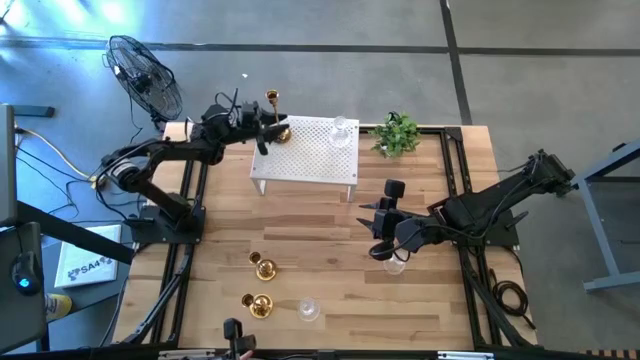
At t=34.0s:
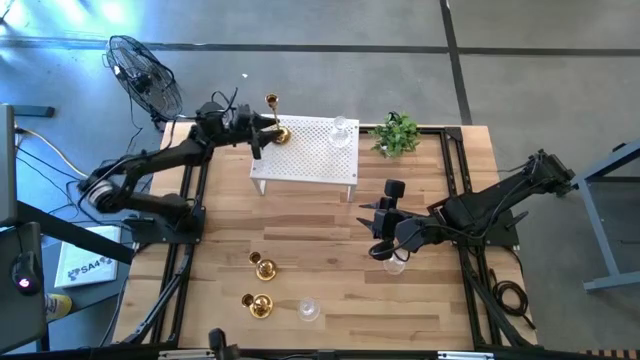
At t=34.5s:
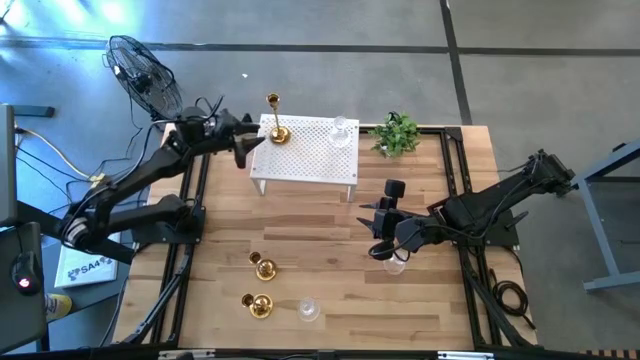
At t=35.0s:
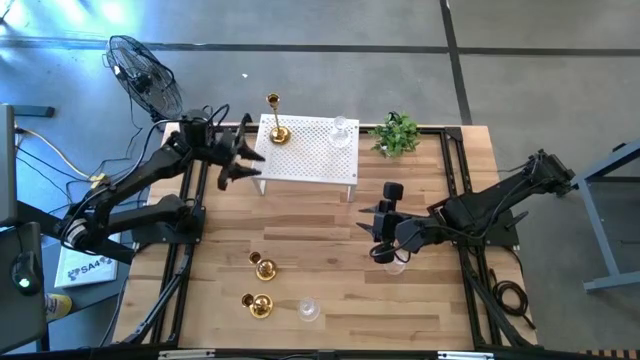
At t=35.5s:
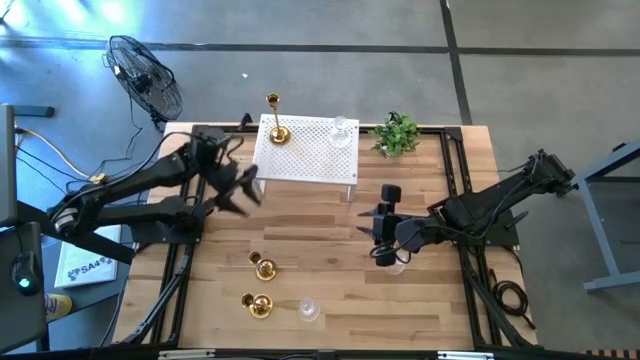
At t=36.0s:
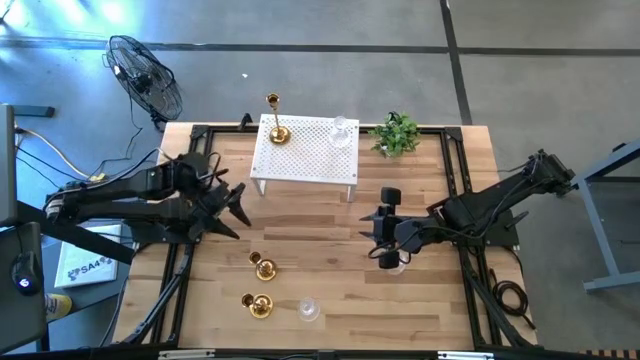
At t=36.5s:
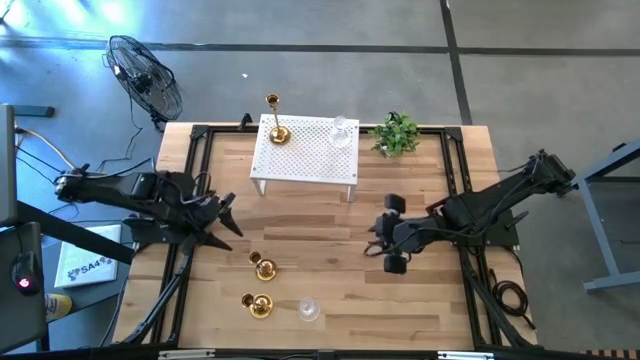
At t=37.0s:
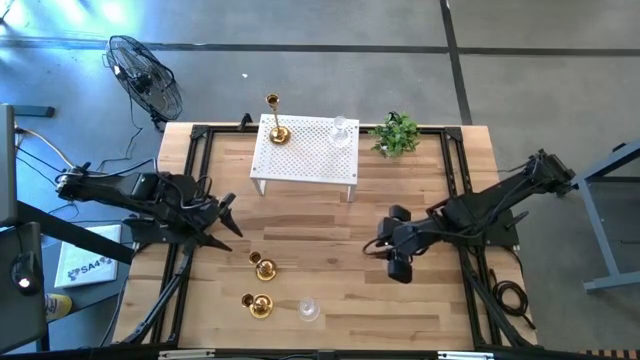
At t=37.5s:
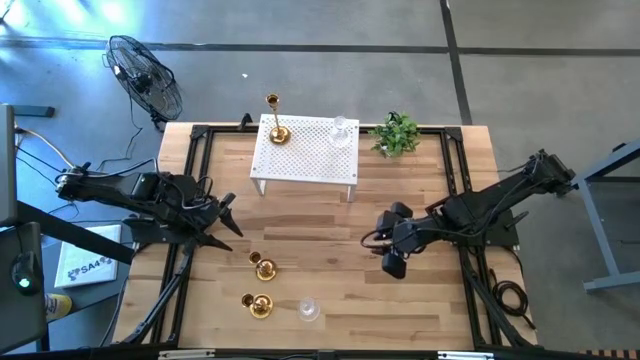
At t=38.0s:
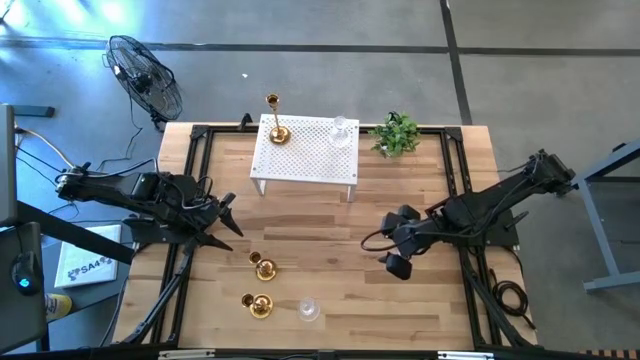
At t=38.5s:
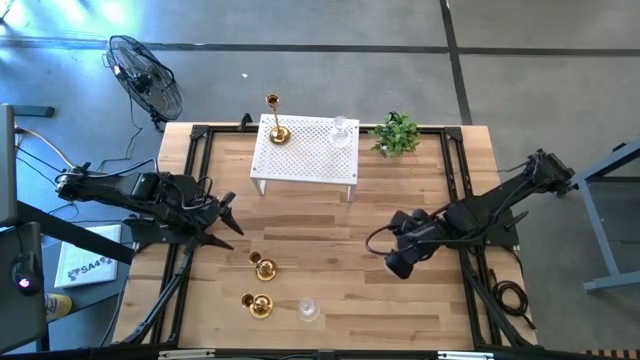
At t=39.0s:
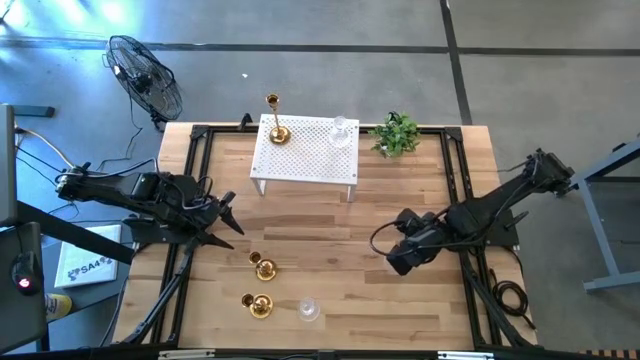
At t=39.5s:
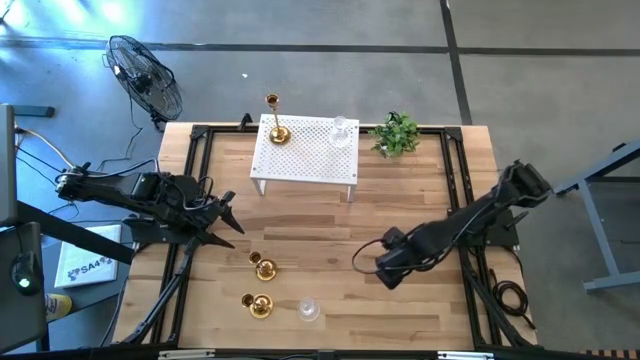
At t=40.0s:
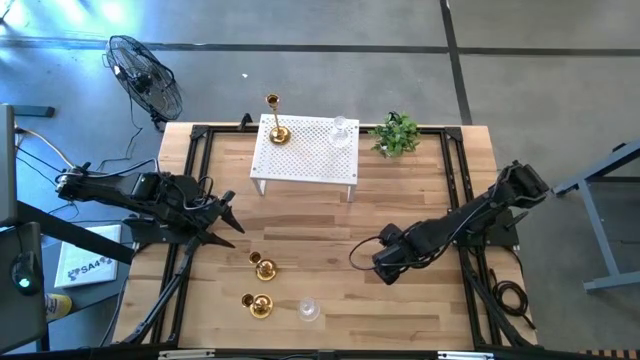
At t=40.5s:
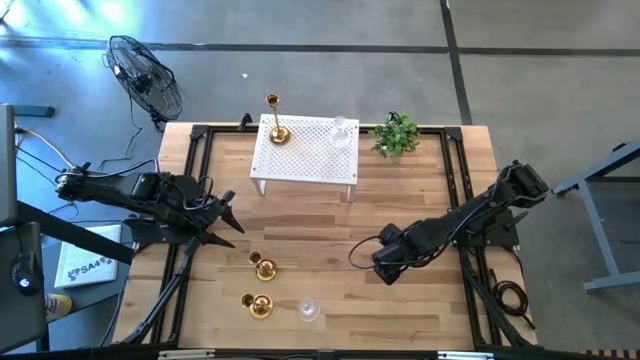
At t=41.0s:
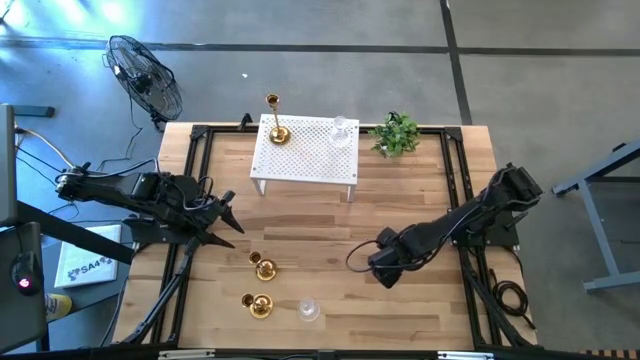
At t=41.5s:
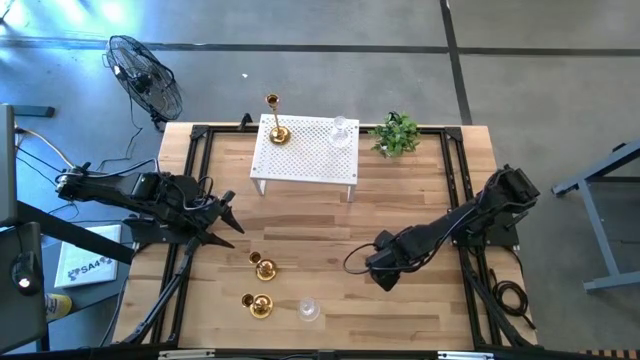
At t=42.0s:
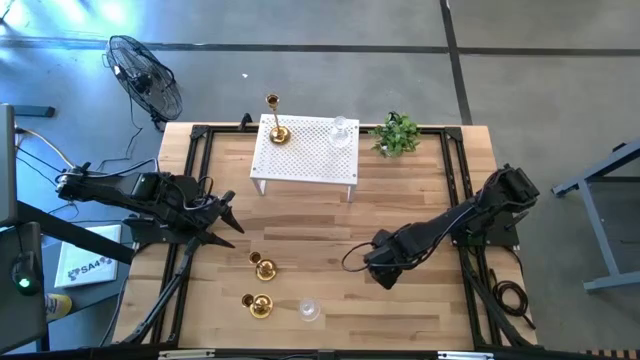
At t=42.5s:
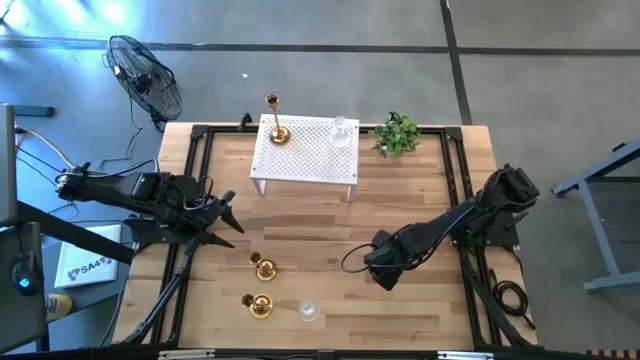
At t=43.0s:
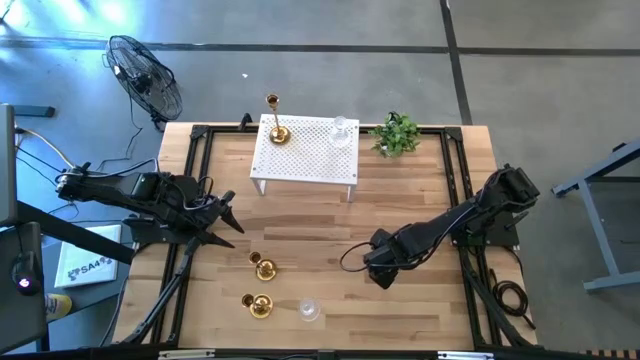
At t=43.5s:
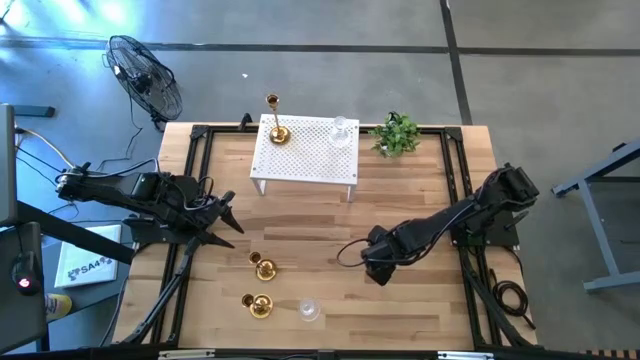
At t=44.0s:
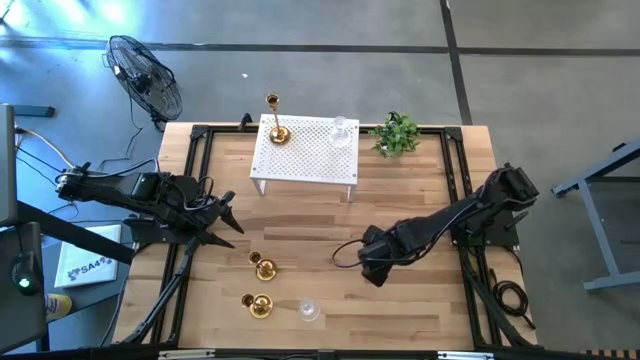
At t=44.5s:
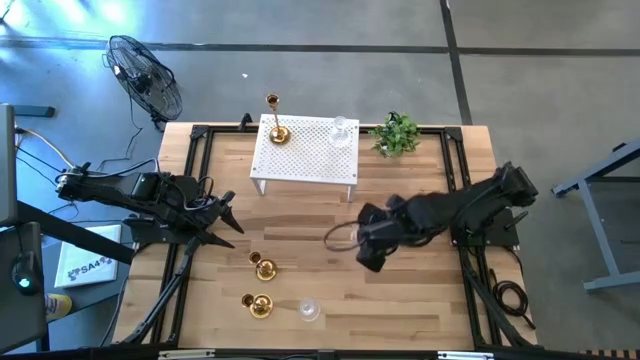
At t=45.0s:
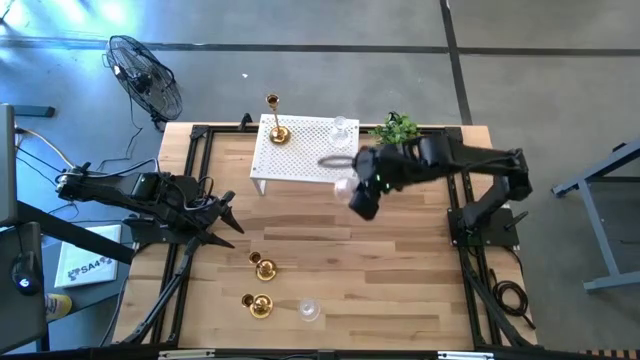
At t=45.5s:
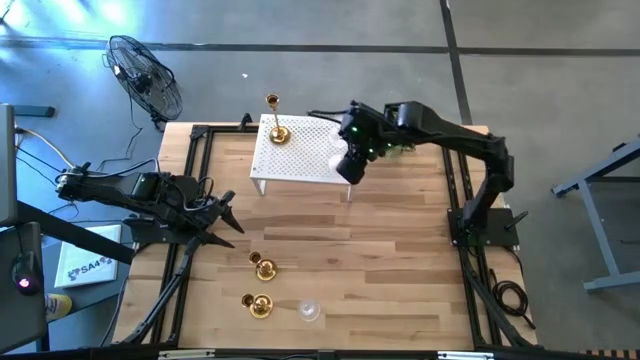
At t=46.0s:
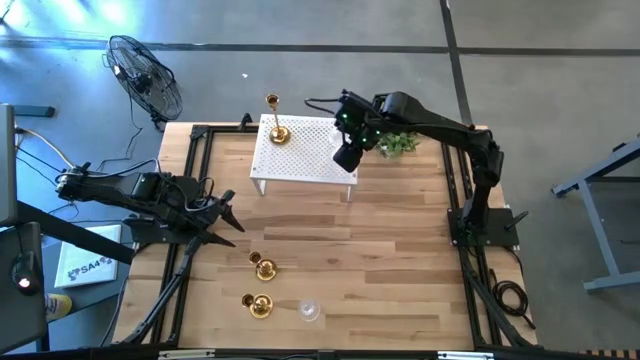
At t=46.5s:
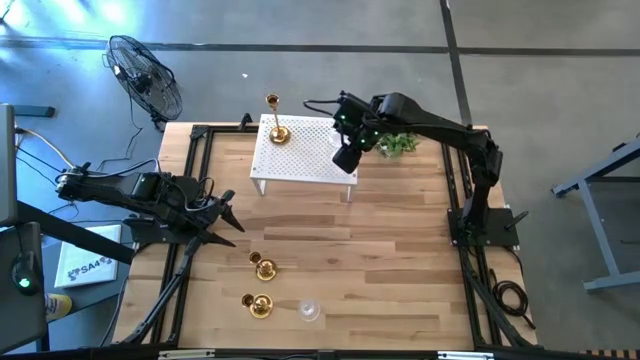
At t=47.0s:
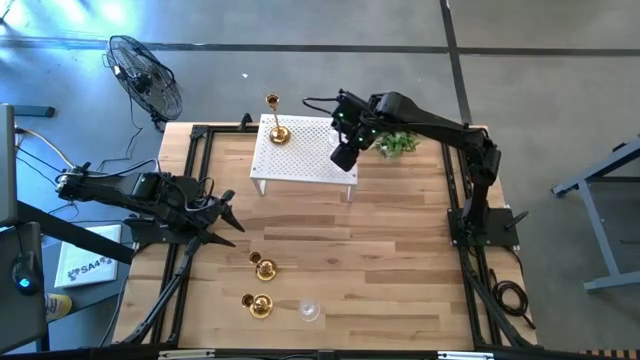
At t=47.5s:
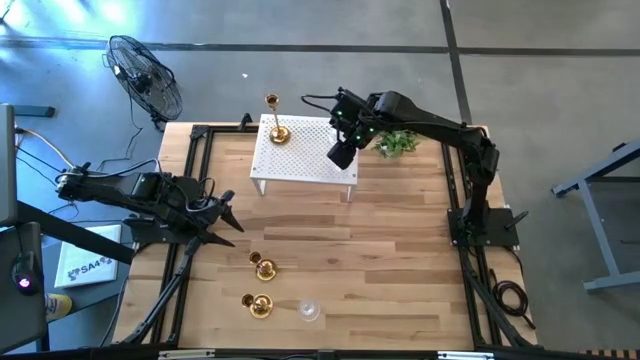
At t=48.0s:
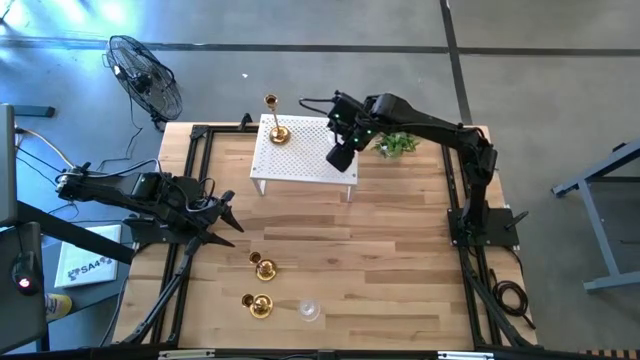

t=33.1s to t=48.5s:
Task: Pick & Place candle stick holders
Put the top transparent candle holder on the shelf aligned with the other transparent candle holder

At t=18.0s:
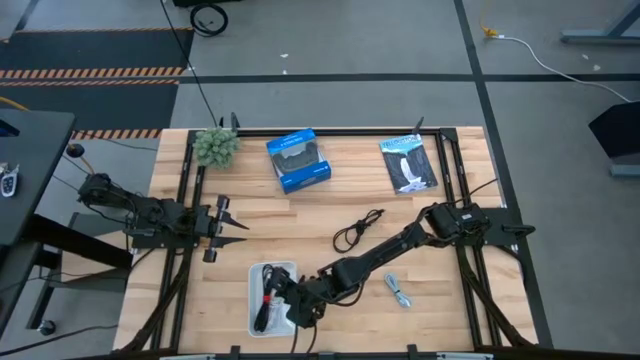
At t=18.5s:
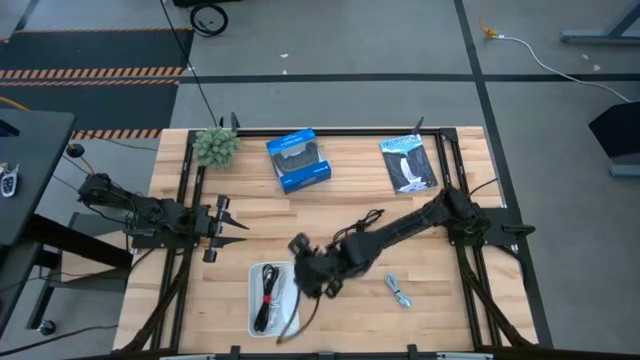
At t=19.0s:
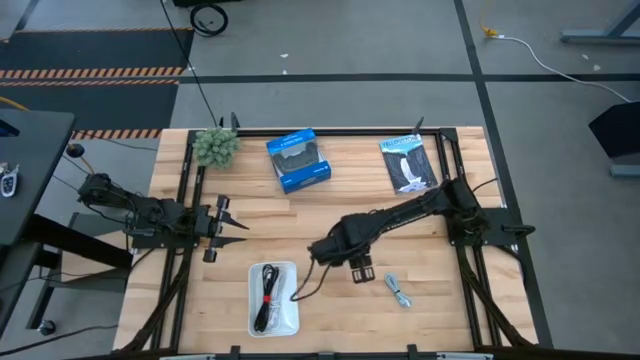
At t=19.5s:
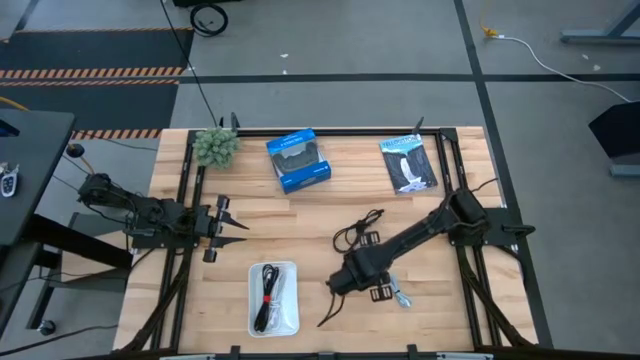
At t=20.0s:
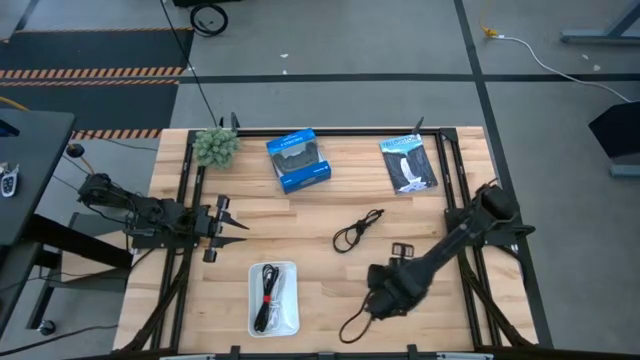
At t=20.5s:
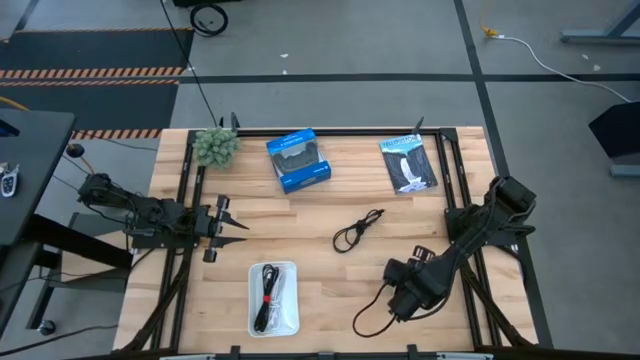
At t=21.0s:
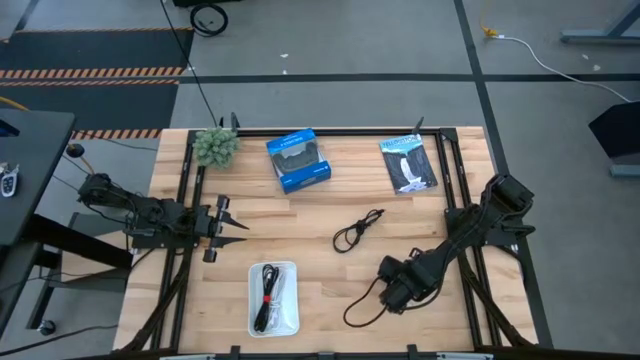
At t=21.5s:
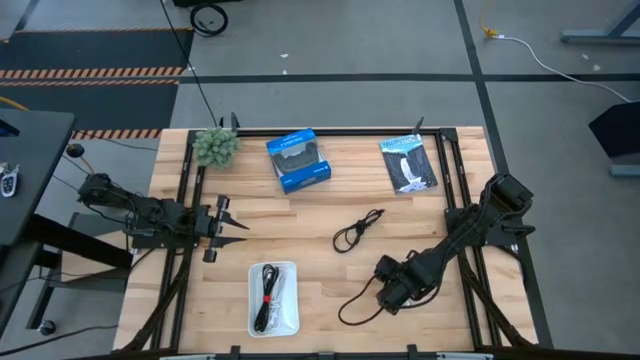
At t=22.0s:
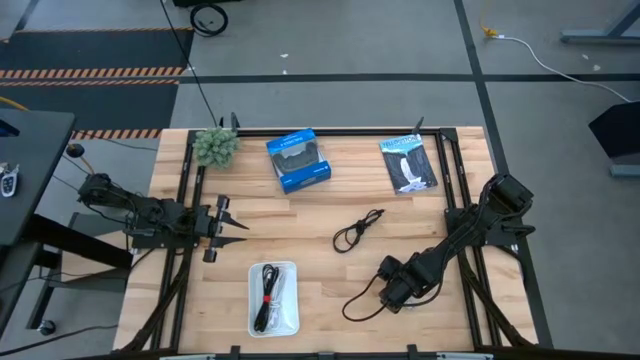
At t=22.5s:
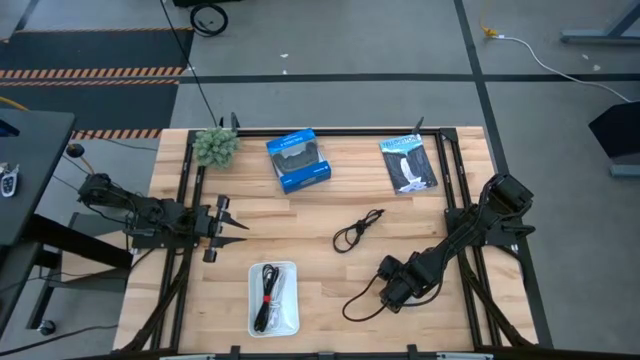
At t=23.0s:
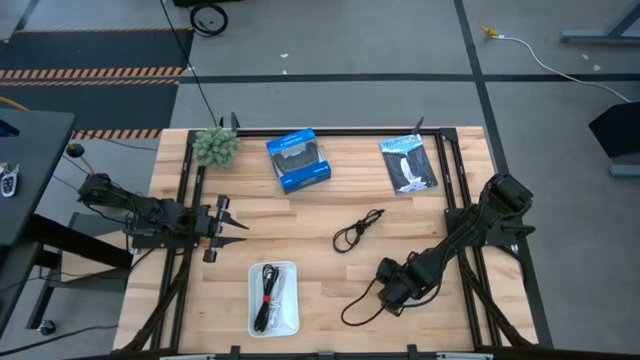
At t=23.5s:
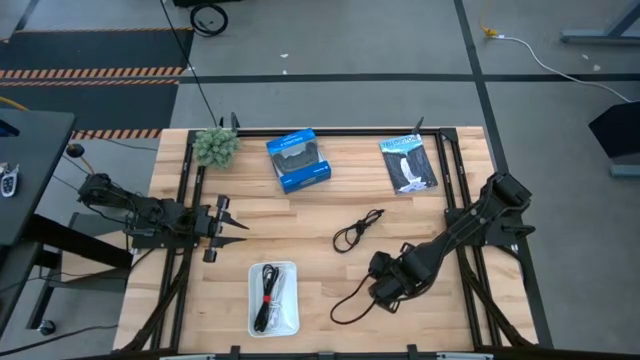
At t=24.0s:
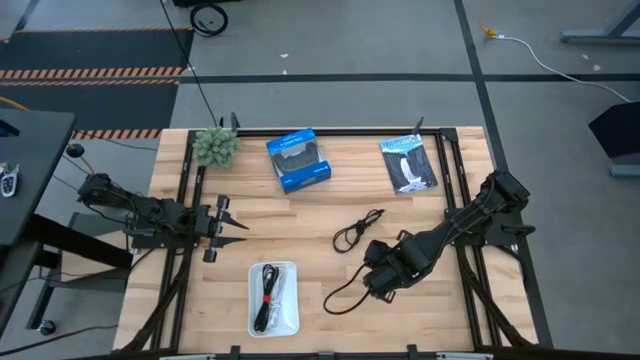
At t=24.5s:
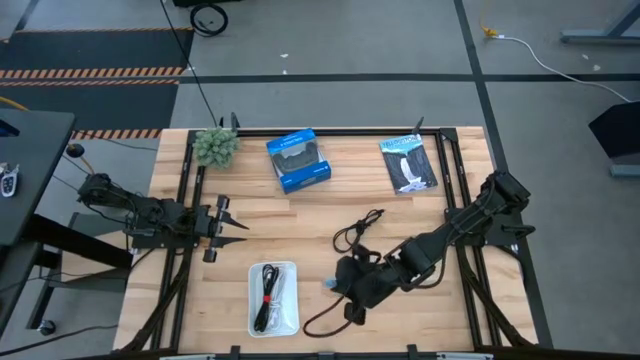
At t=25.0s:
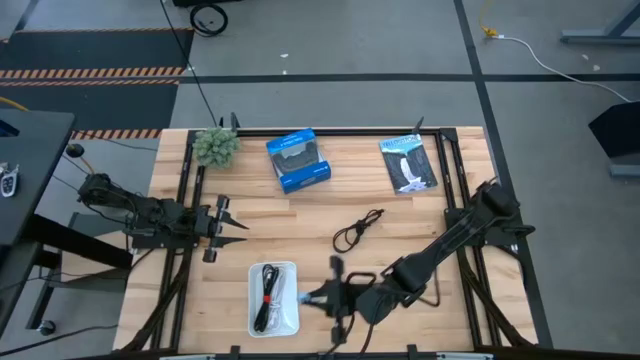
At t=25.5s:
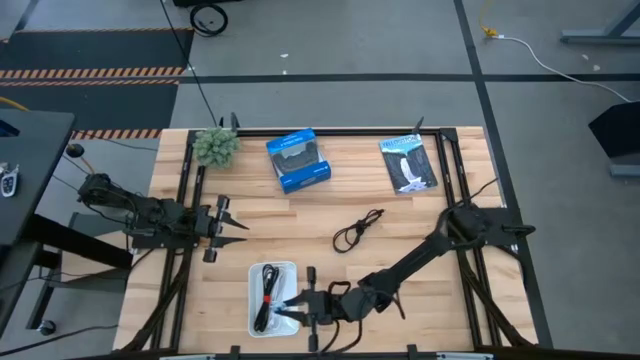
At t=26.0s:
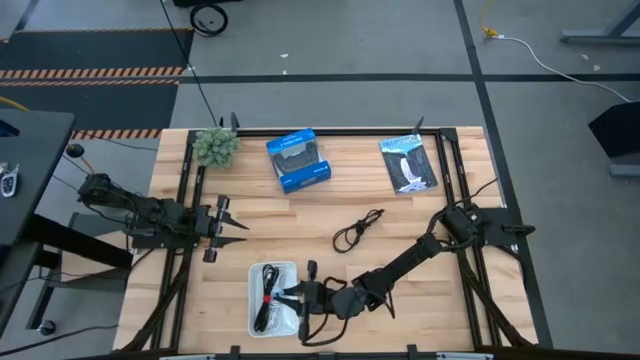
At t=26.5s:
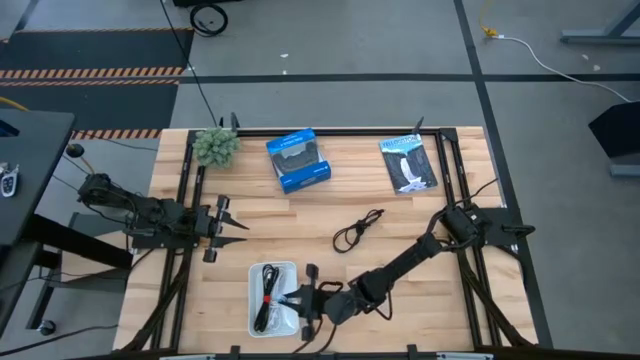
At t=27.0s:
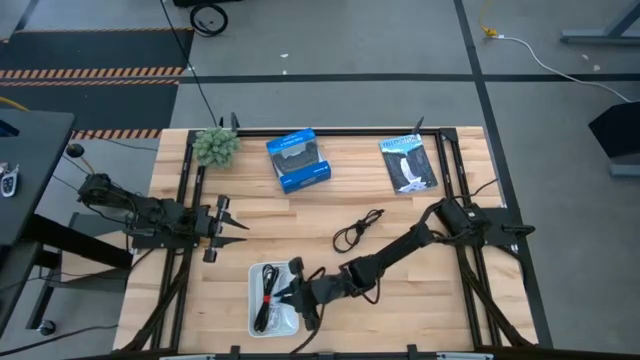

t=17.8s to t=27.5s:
Task: Pick and place USB-C Cables
Put the white charger cable into the white bin
